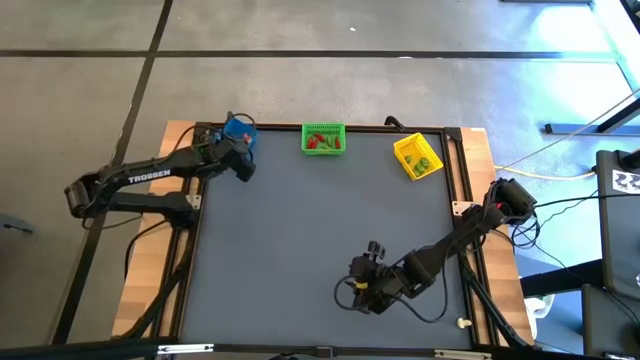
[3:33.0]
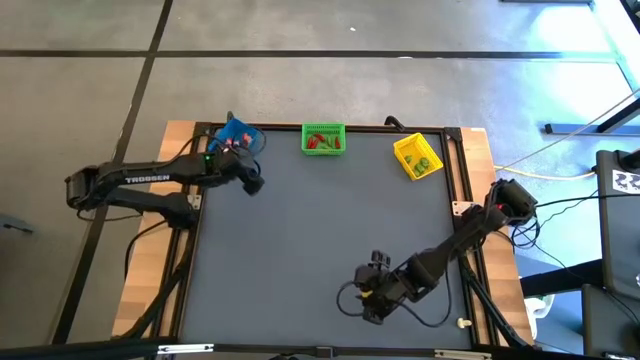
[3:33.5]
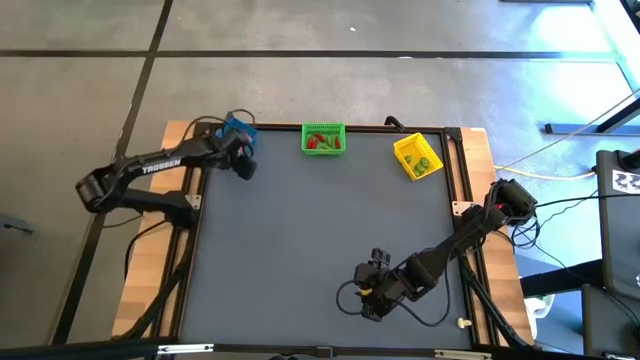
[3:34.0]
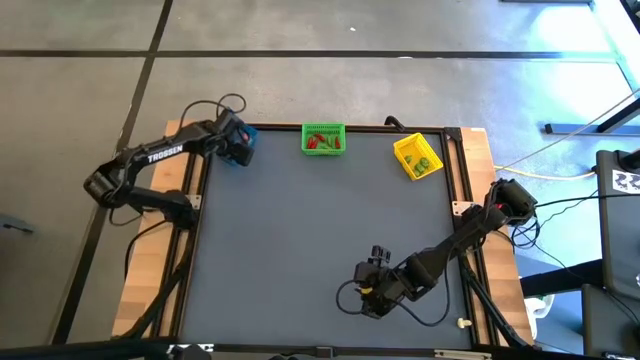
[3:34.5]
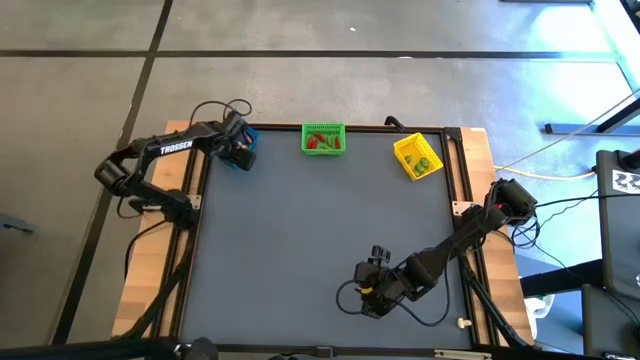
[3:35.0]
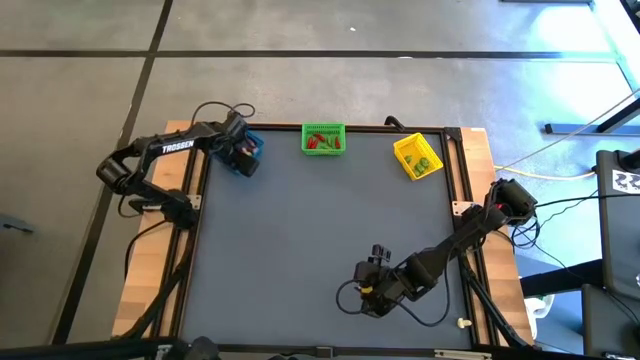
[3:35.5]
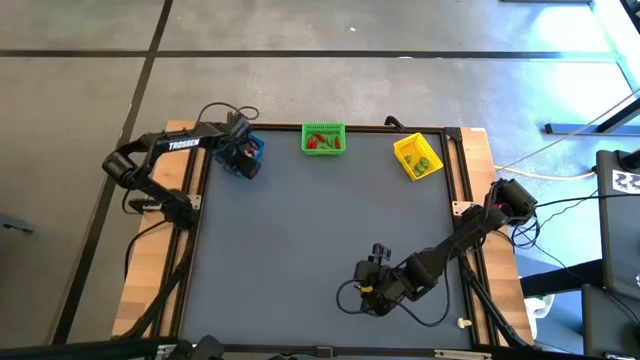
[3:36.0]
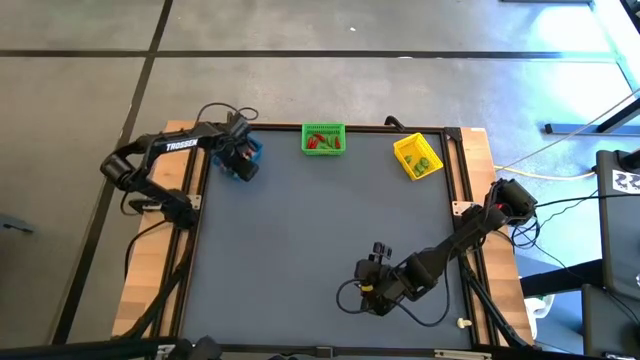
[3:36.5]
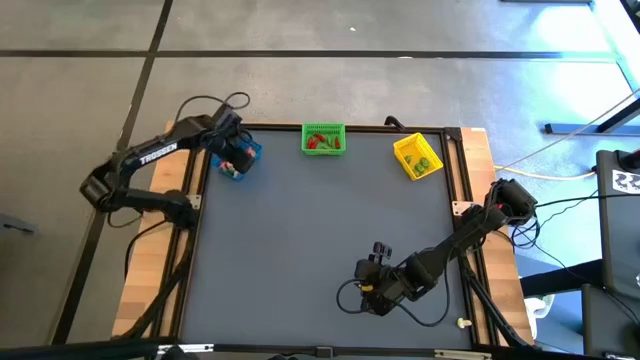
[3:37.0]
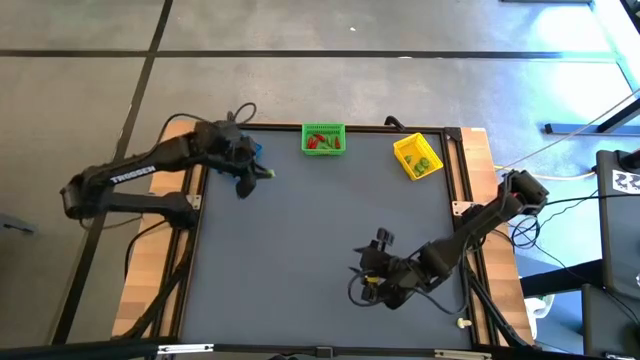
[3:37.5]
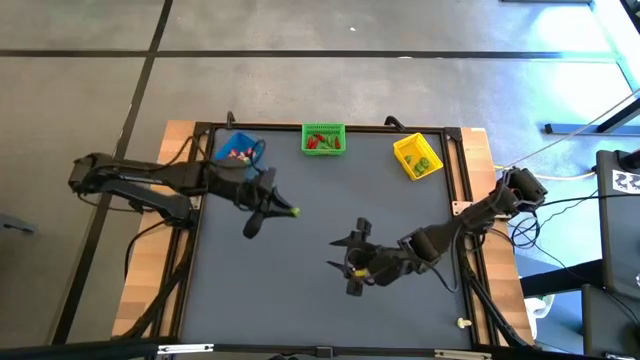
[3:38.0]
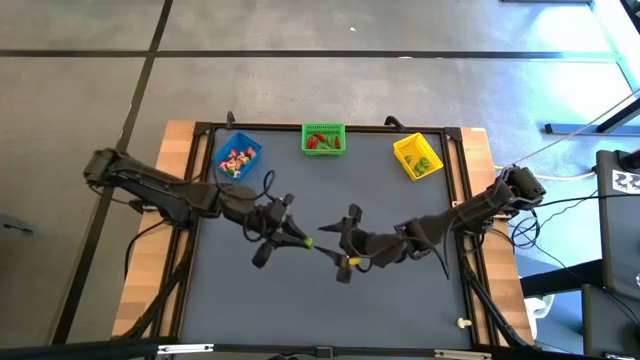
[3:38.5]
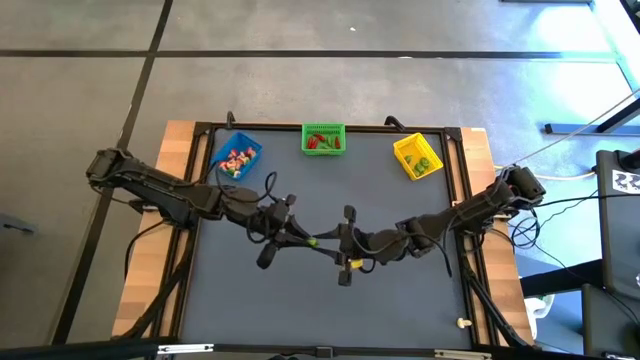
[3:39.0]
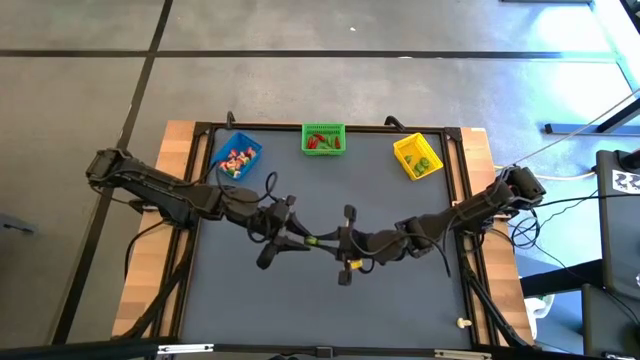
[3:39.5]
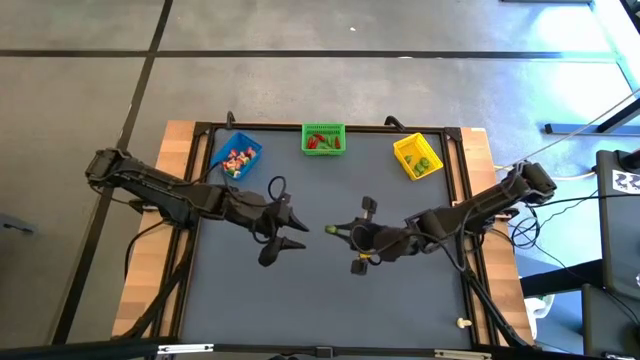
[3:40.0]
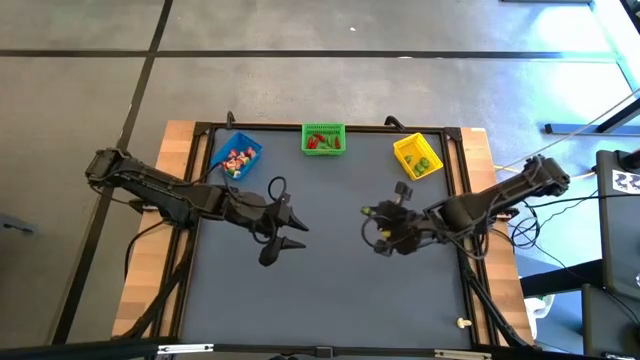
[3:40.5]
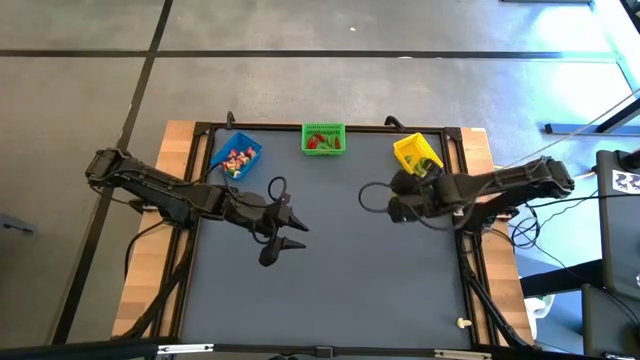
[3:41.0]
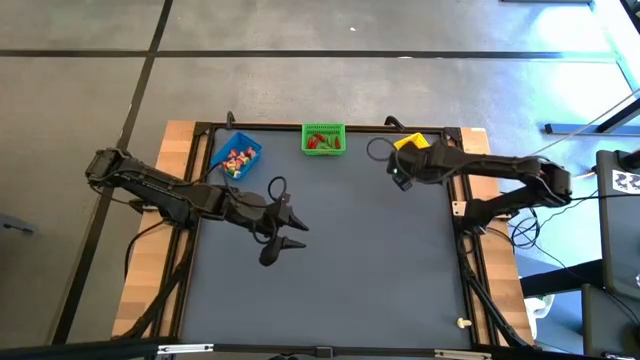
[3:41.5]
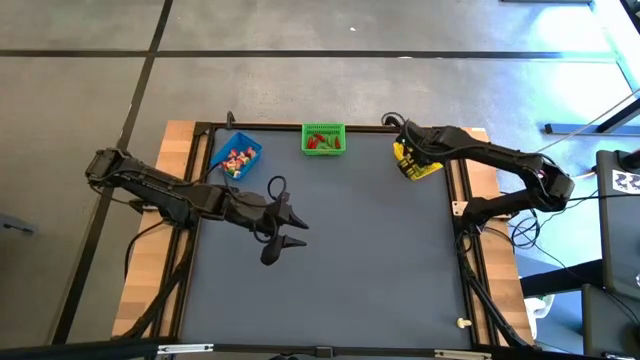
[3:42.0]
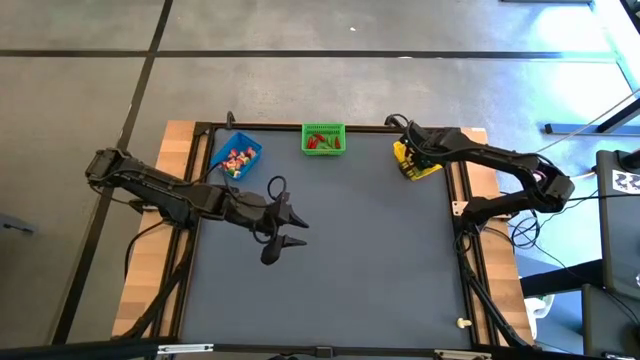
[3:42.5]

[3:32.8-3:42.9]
Task: Sort produce into baskets
Put the green chili pepper into the yellow bin

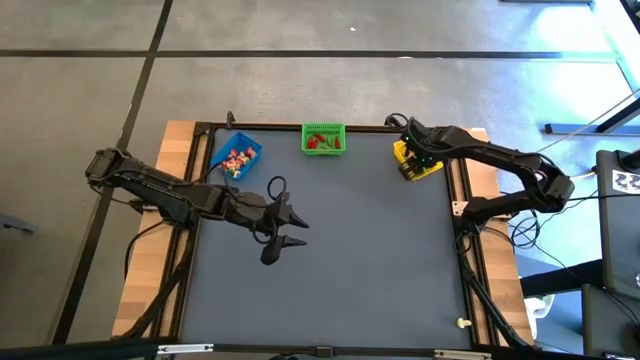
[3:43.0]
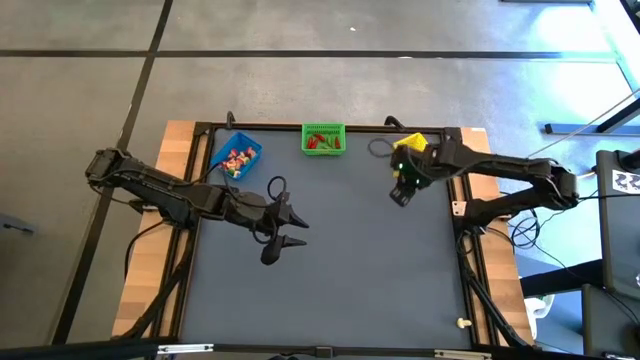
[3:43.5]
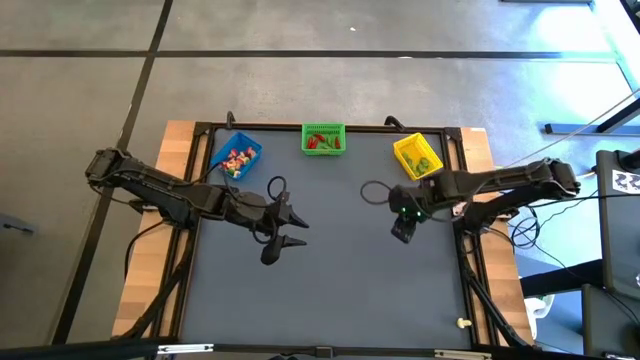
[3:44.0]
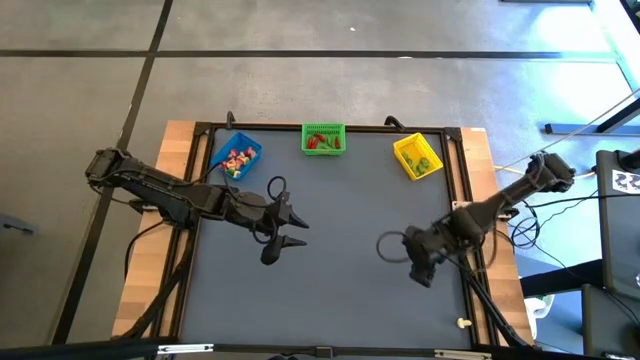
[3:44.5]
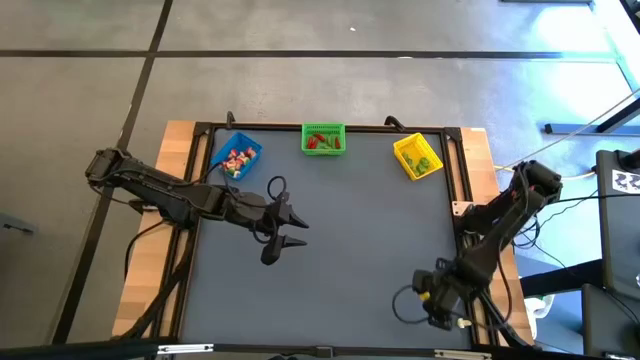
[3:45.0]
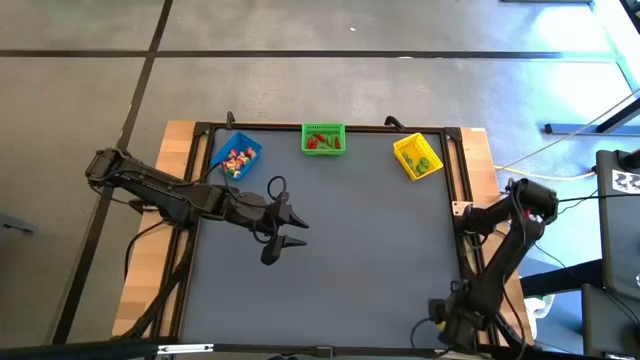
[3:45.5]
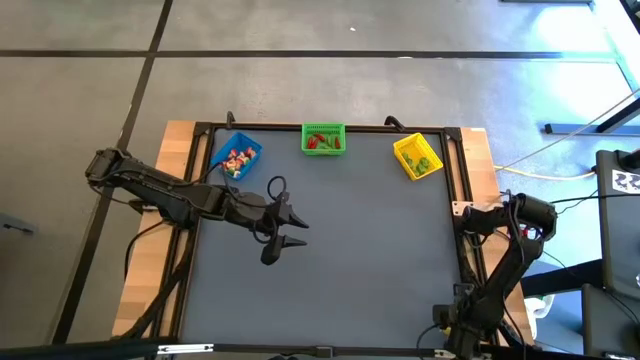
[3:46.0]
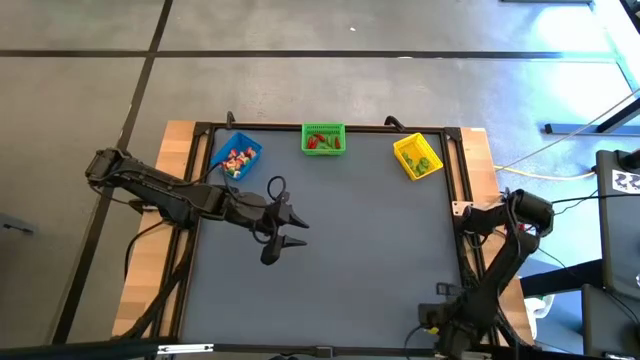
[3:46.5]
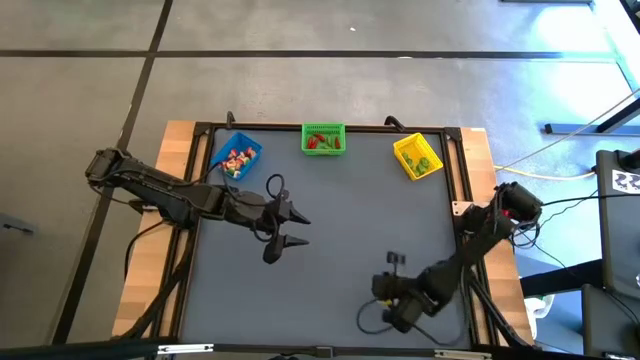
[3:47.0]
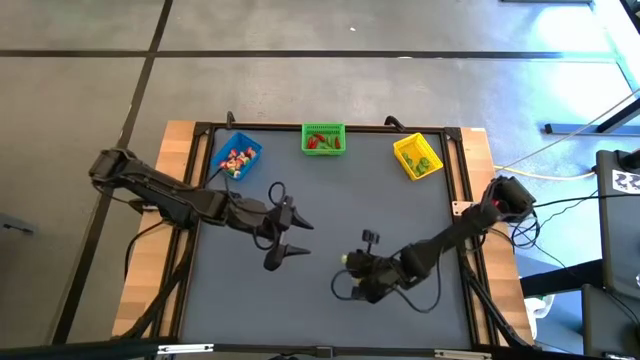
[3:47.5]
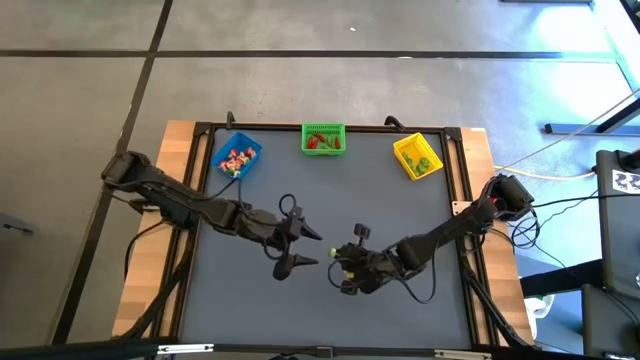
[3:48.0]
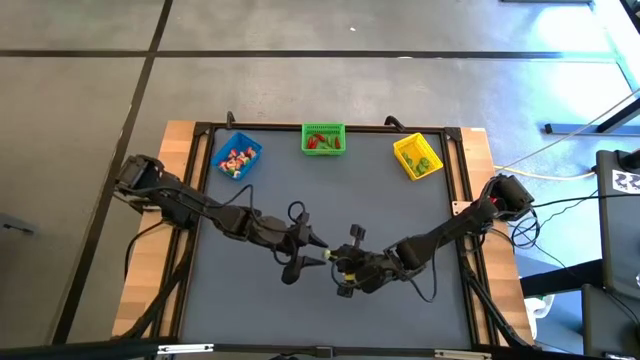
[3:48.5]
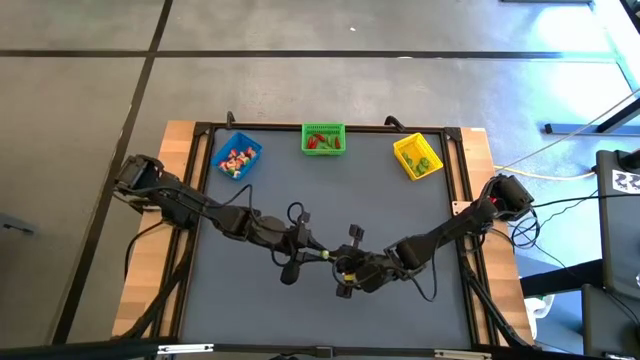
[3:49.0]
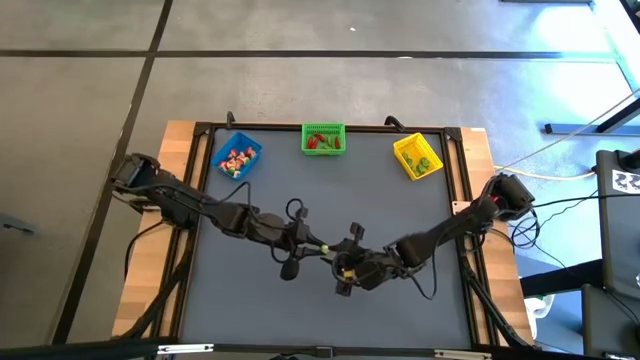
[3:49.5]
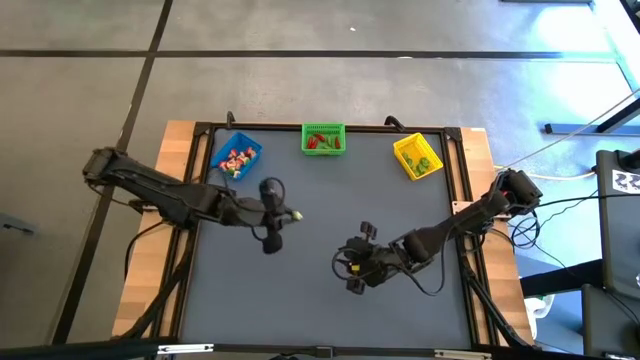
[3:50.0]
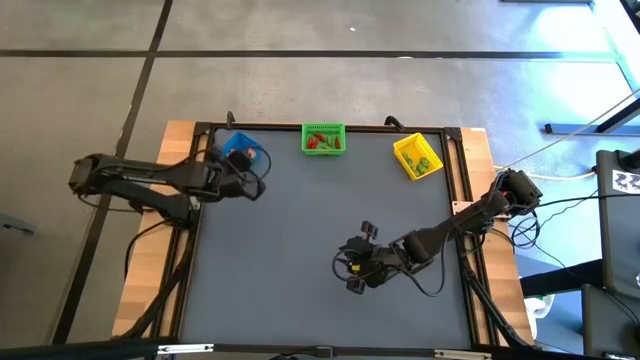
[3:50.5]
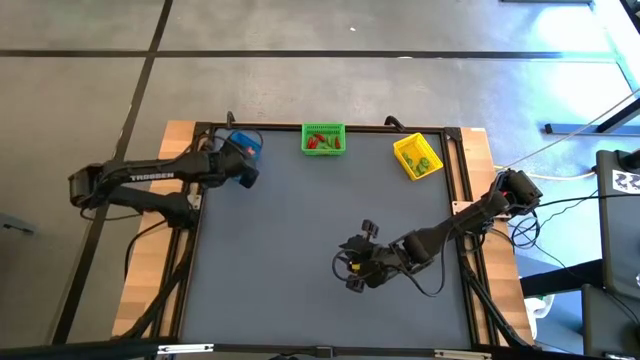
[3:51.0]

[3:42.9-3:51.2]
Put the green mushroom into the blue bin
